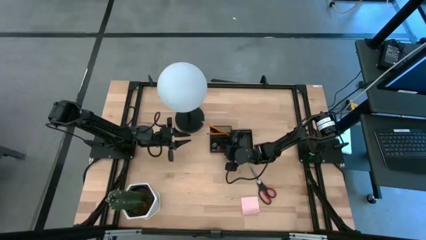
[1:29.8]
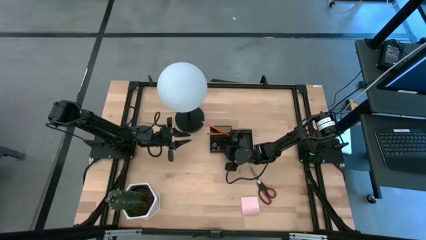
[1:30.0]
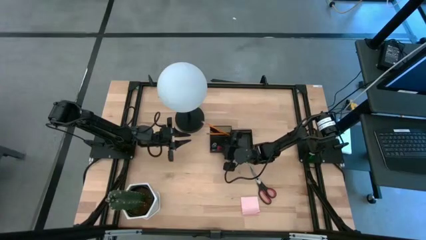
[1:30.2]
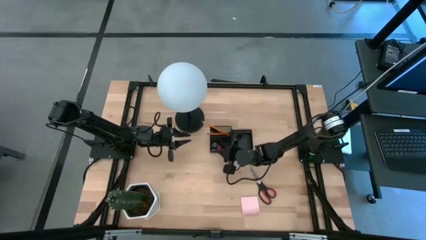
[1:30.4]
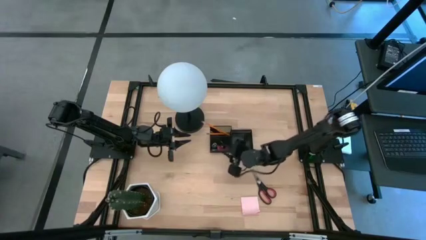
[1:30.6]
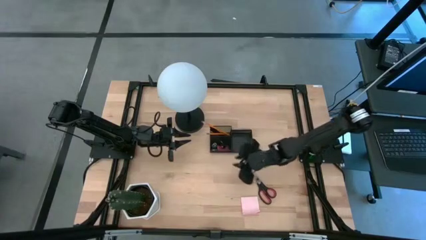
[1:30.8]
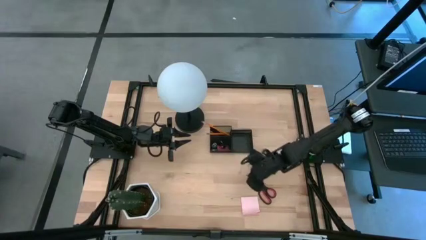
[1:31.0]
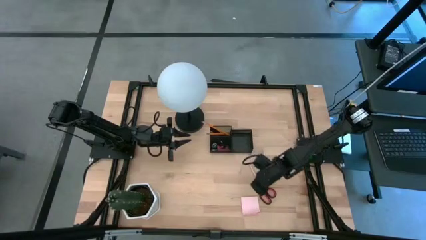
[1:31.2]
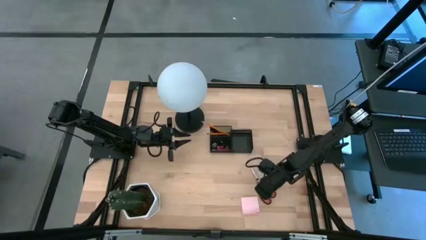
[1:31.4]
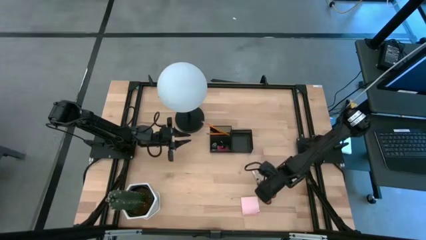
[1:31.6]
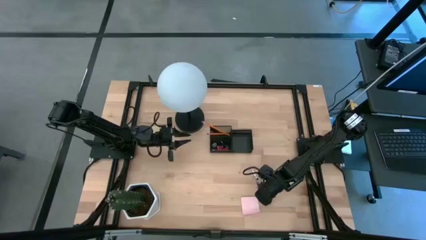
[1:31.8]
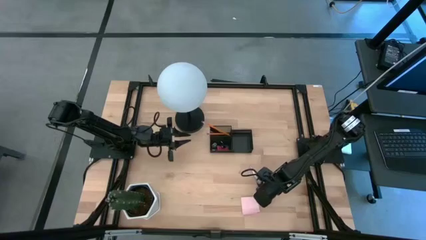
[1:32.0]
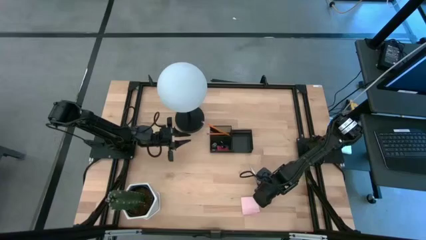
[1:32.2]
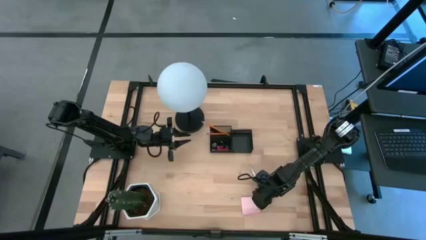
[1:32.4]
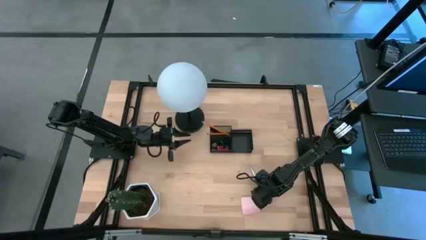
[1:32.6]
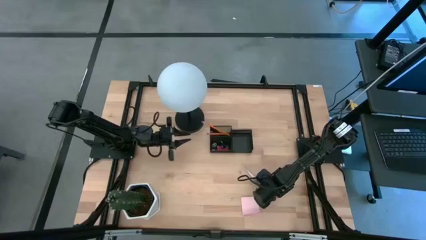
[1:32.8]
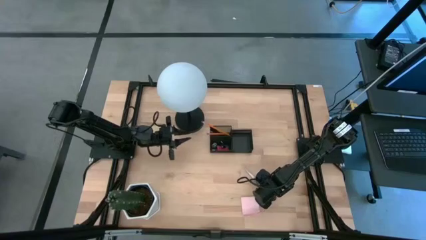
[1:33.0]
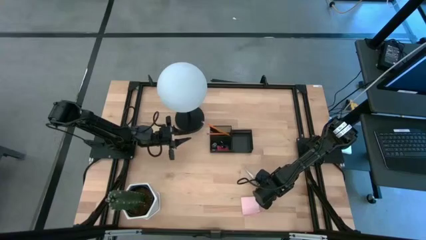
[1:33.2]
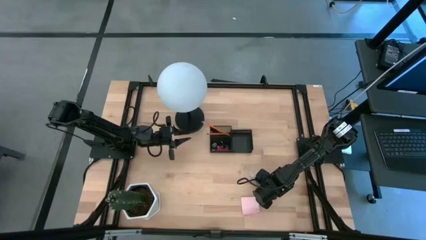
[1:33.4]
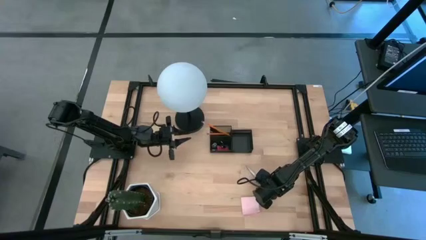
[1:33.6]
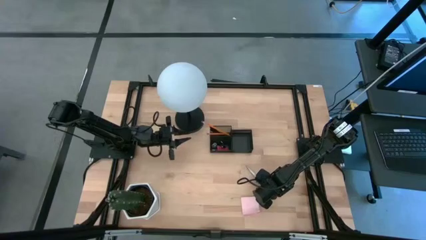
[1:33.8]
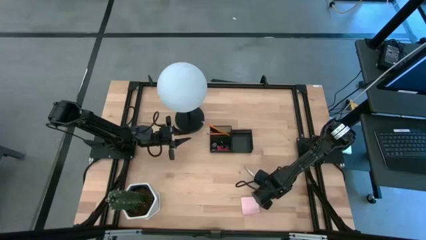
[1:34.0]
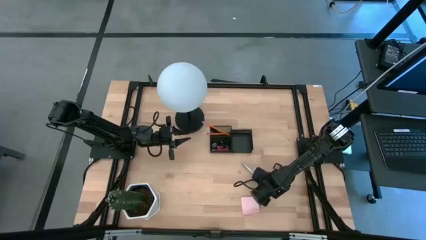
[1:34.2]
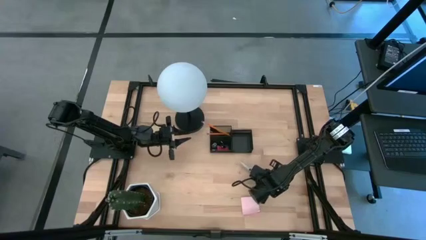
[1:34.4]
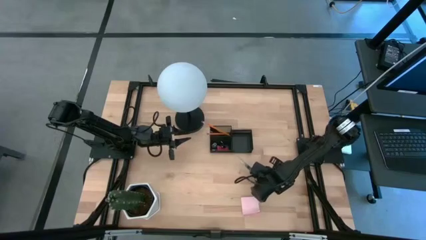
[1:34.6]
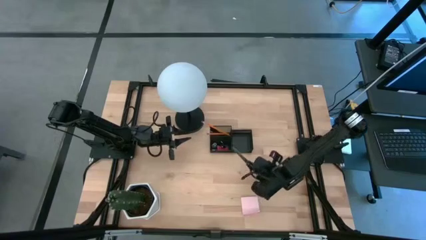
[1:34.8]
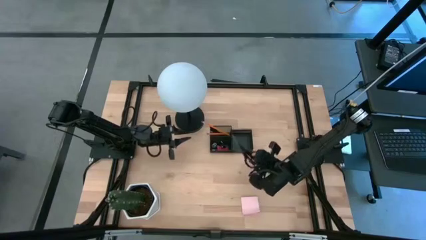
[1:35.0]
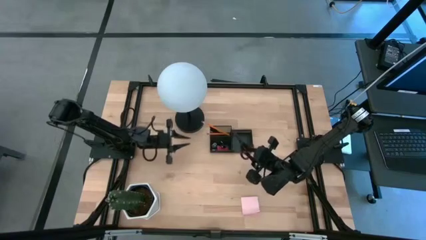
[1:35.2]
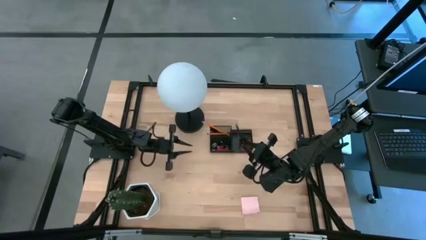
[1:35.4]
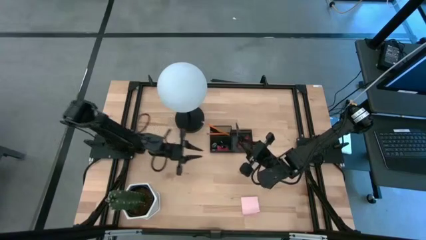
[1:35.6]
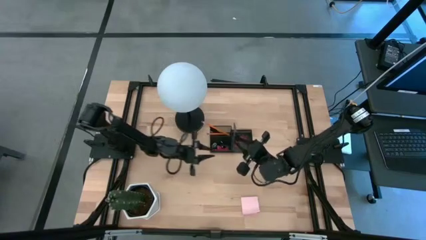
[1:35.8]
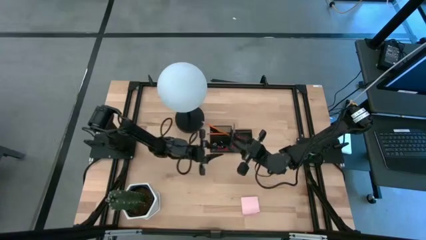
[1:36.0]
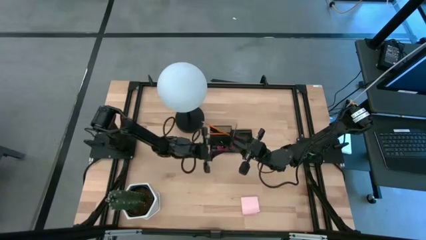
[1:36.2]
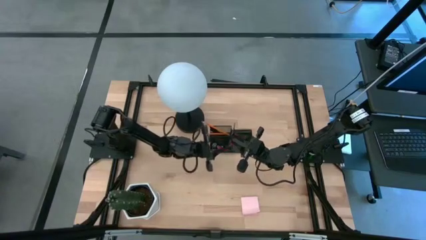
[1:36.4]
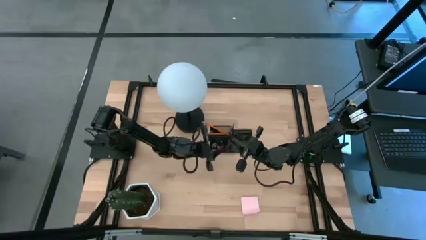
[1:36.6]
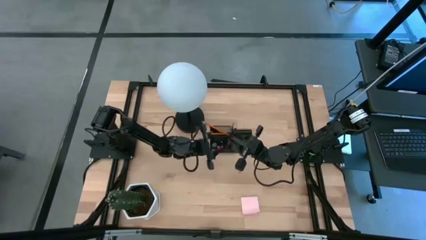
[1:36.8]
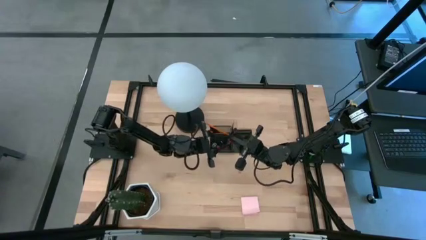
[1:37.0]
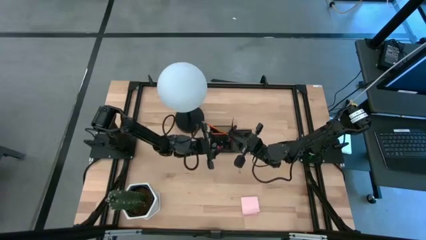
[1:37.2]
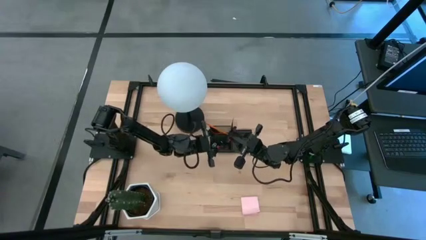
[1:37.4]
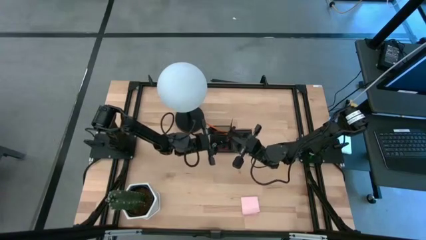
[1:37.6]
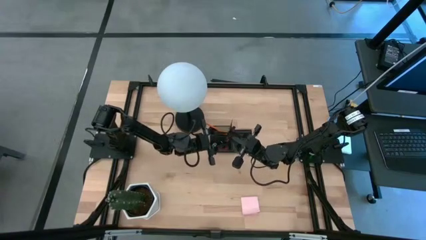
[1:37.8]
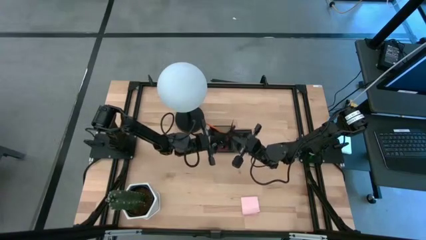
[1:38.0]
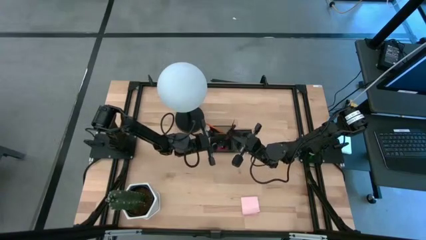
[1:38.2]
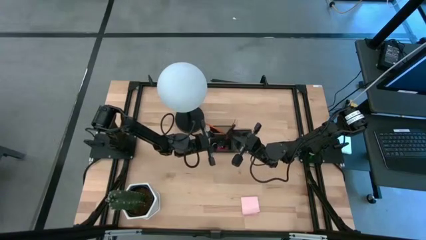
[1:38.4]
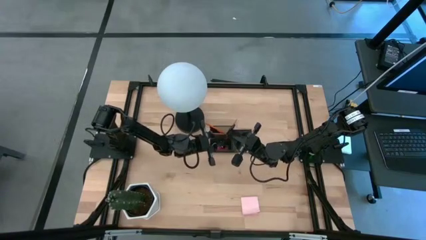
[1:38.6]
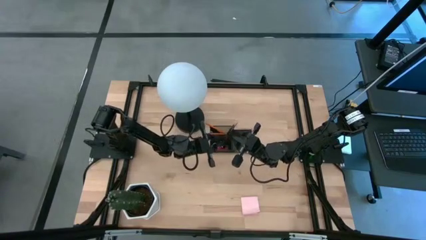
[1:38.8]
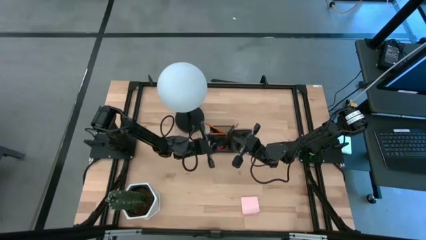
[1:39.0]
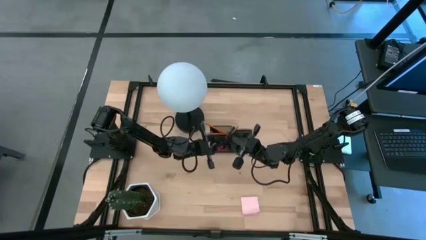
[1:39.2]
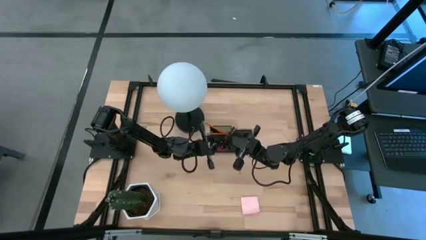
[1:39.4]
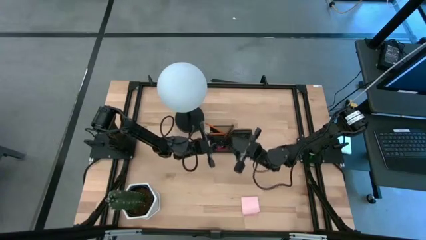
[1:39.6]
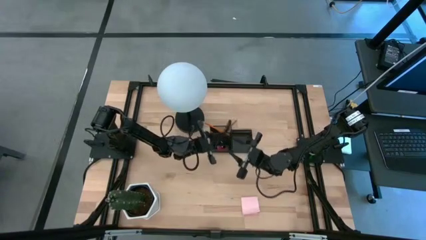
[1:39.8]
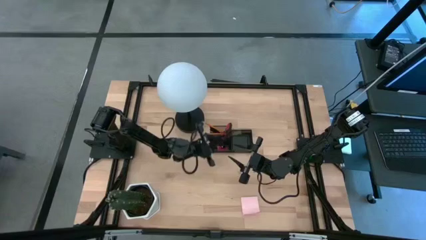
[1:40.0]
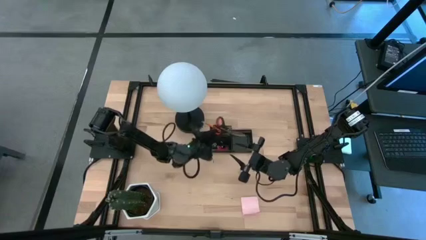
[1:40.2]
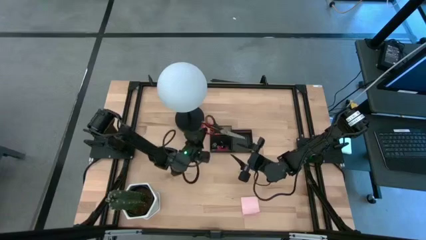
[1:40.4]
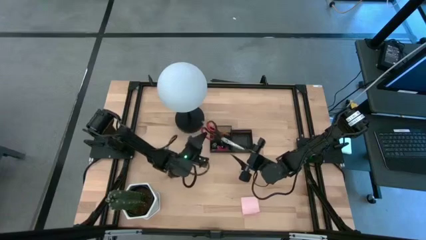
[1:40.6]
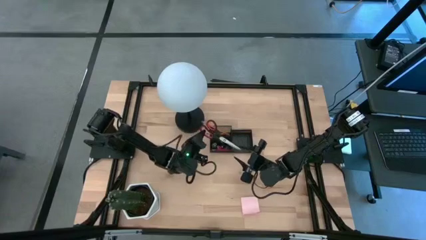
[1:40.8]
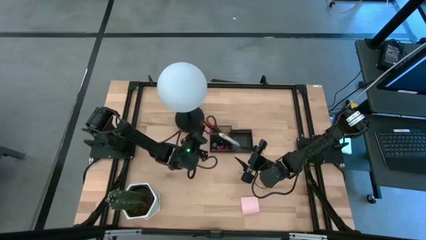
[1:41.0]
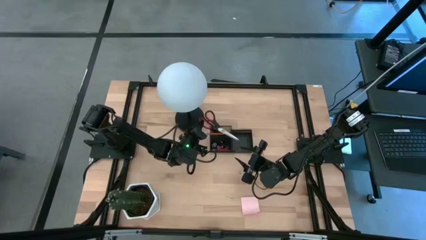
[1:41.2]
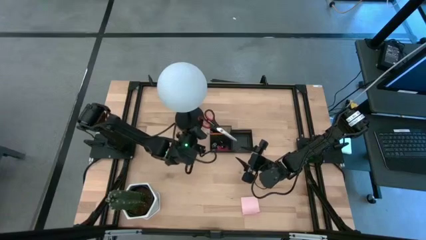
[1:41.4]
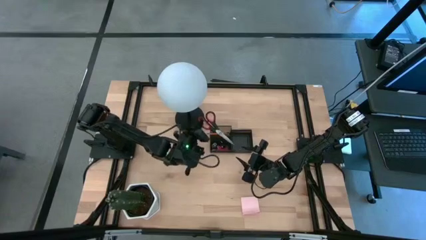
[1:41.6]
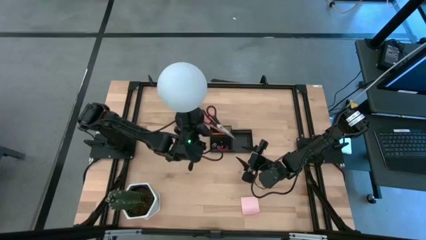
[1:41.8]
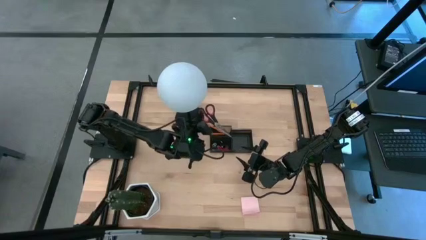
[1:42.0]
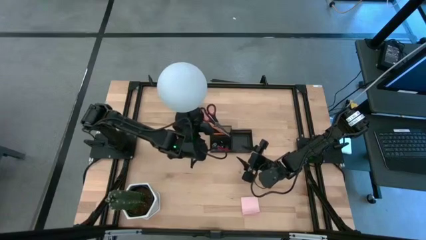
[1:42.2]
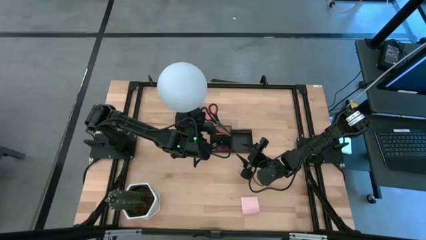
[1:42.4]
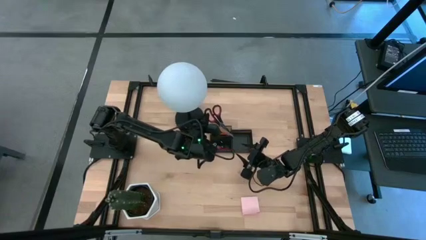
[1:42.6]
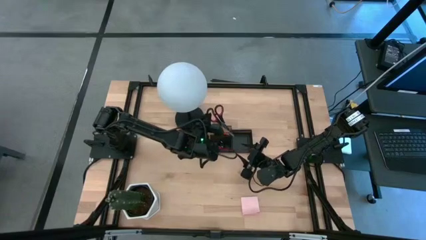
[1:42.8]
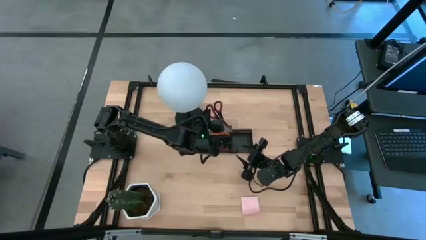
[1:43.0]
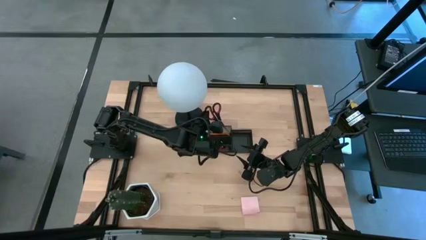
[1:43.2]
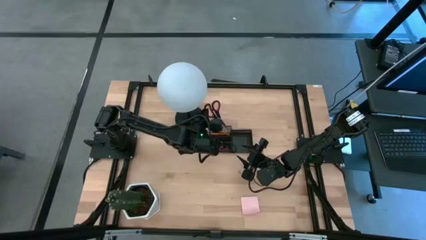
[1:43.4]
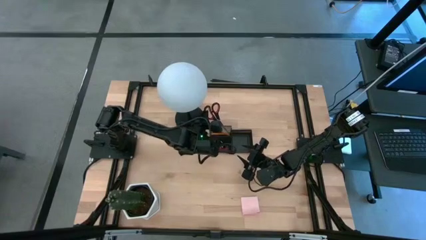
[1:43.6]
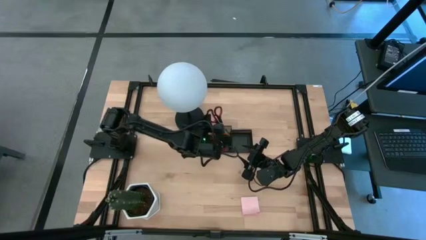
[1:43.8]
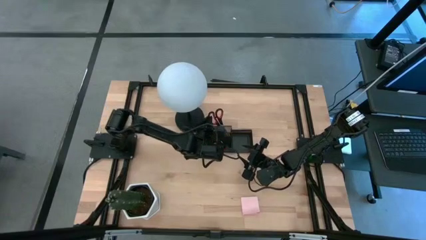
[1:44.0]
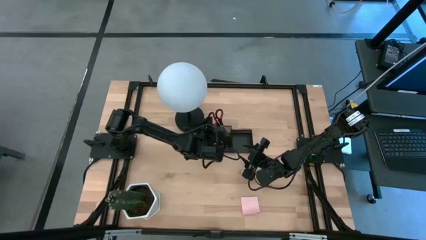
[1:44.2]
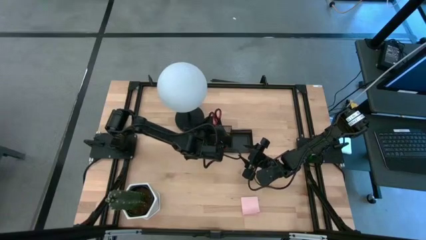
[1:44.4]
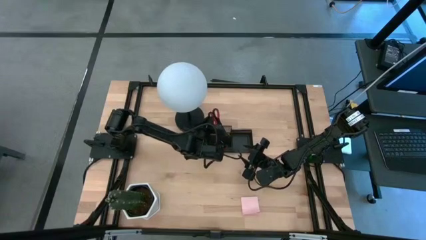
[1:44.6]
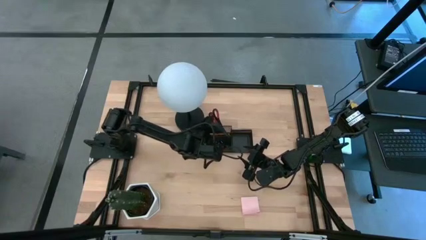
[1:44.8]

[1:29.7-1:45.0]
Task: Pick and place office supplies into organizer
Put the black scissors into the black desk organizer

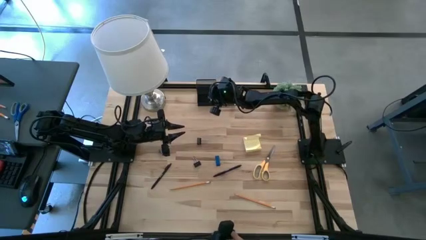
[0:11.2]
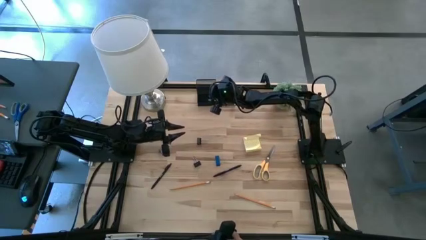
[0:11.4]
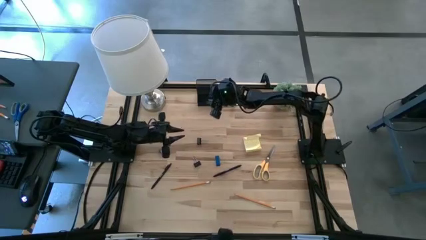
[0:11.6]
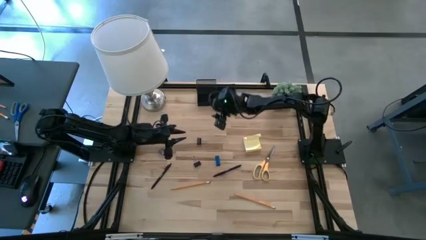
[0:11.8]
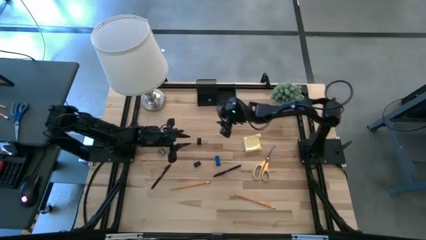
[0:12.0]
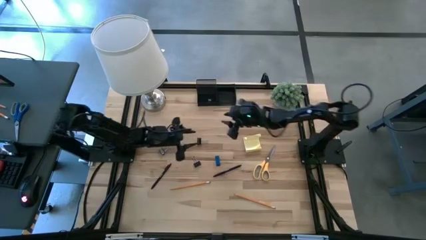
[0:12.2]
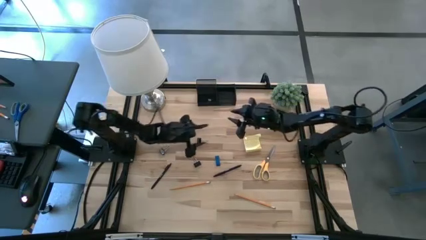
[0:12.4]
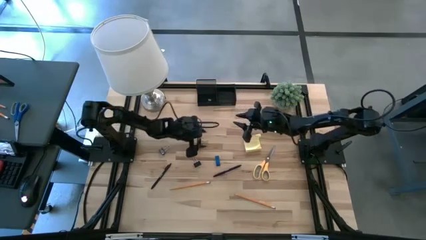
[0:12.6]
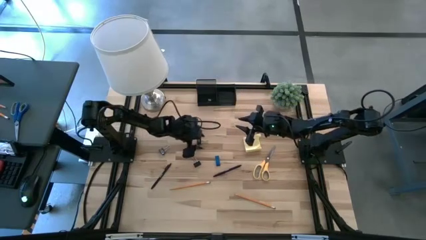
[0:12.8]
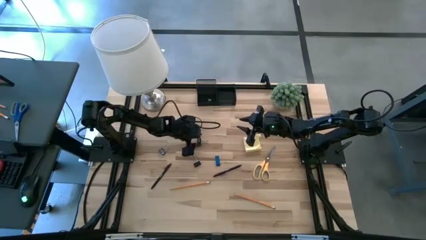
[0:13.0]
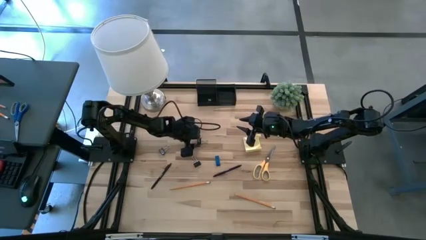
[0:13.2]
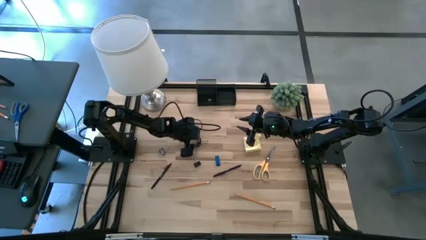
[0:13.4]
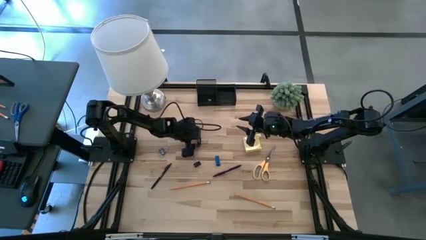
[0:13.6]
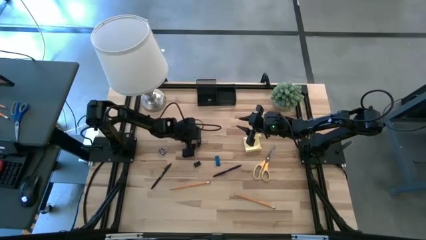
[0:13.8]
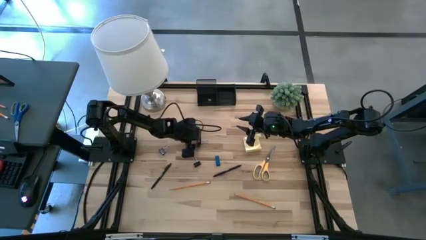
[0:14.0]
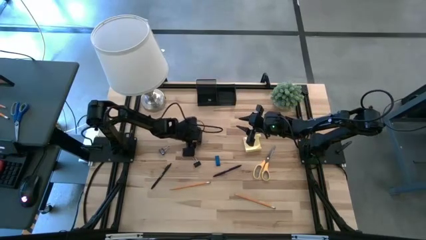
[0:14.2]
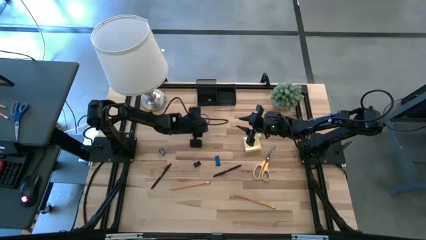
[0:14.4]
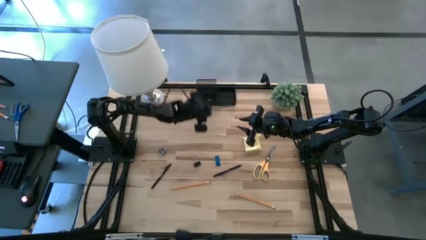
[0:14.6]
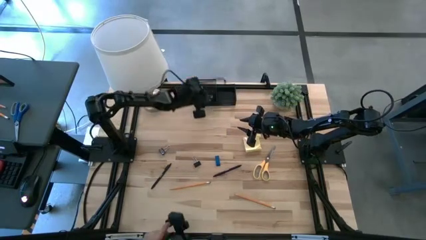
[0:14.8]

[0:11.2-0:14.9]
Task: Pick and place office supplies into organizer
Put the top black binder clip into the black desk organizer
